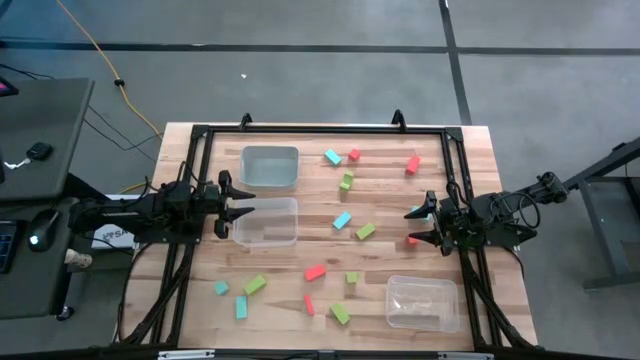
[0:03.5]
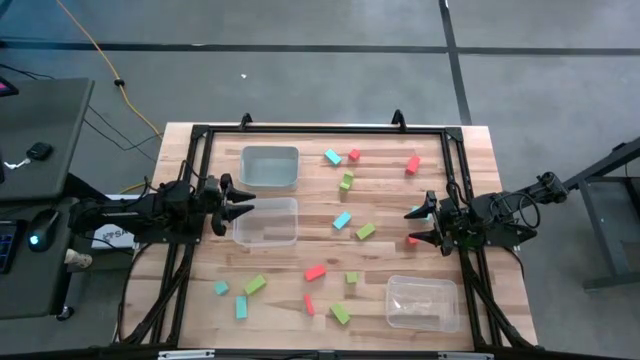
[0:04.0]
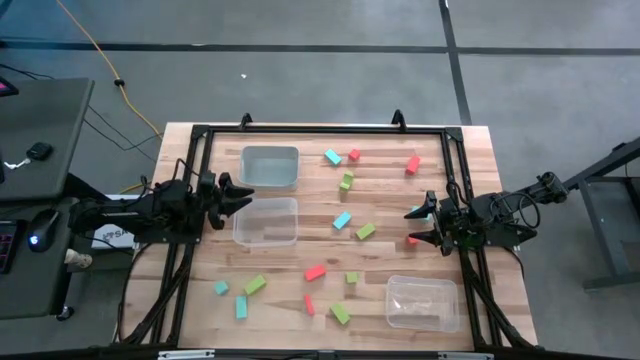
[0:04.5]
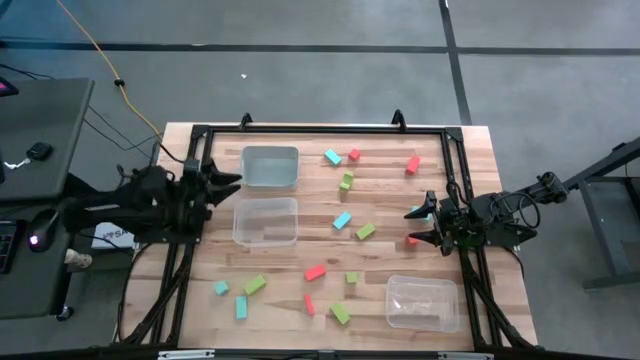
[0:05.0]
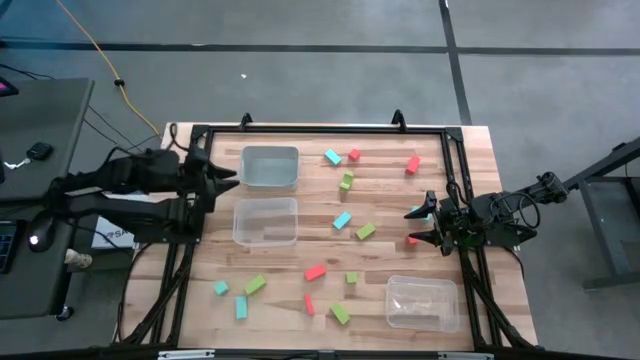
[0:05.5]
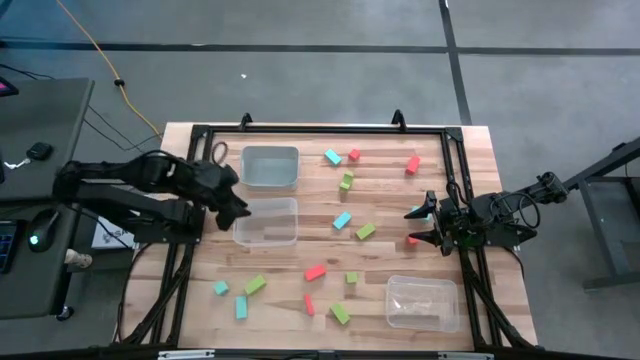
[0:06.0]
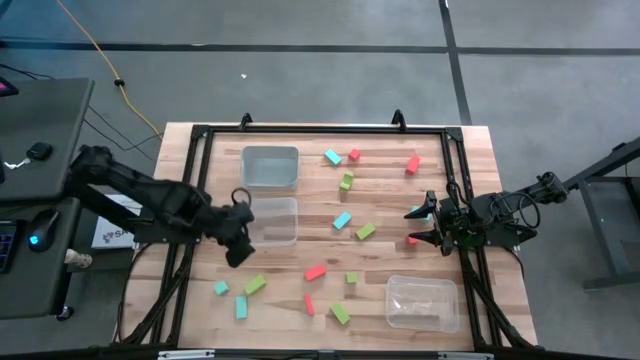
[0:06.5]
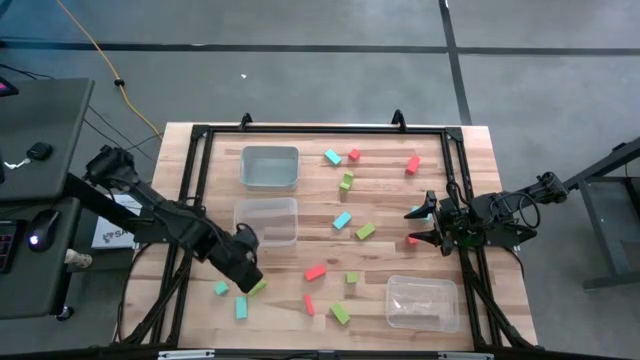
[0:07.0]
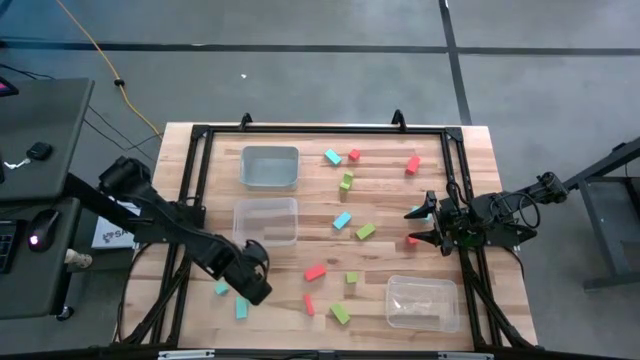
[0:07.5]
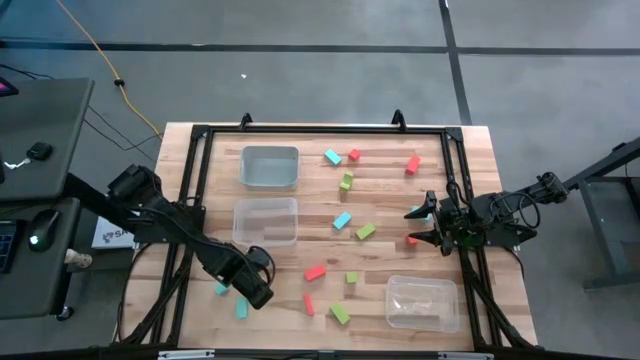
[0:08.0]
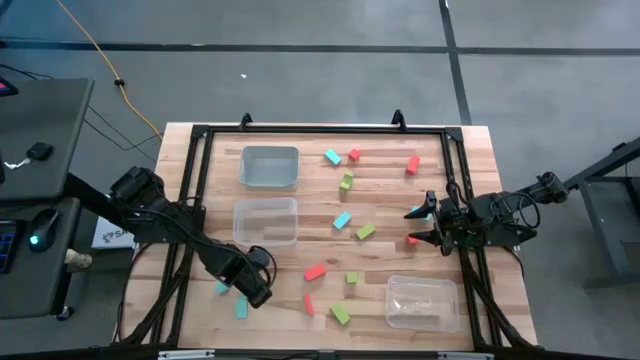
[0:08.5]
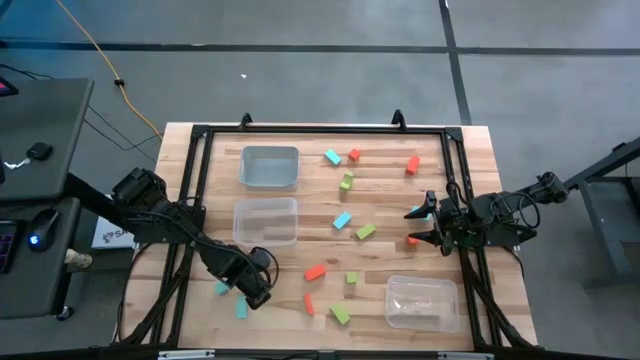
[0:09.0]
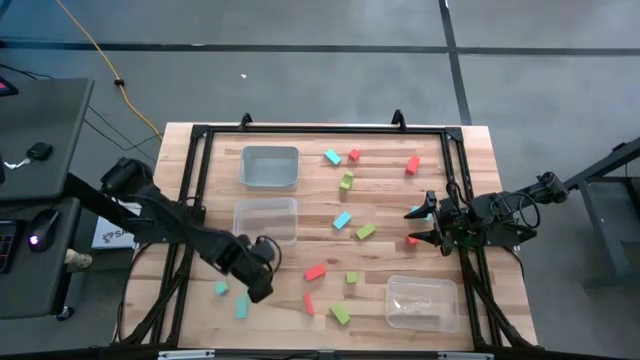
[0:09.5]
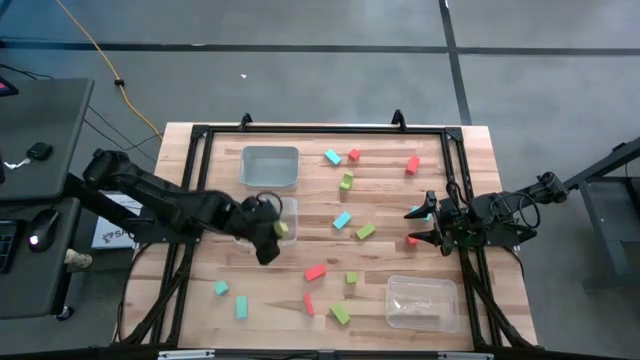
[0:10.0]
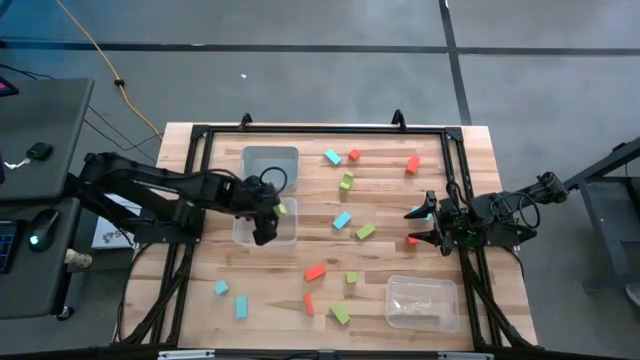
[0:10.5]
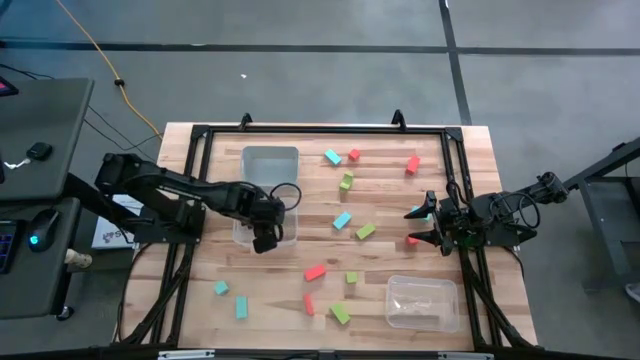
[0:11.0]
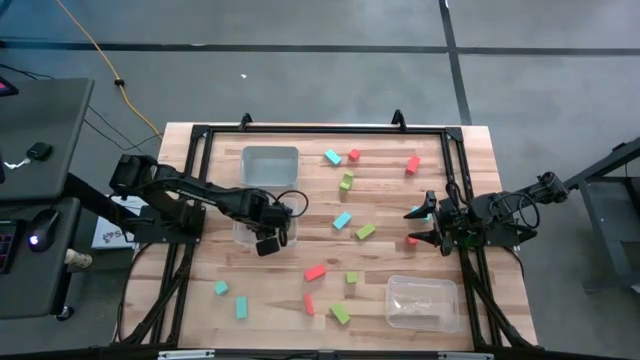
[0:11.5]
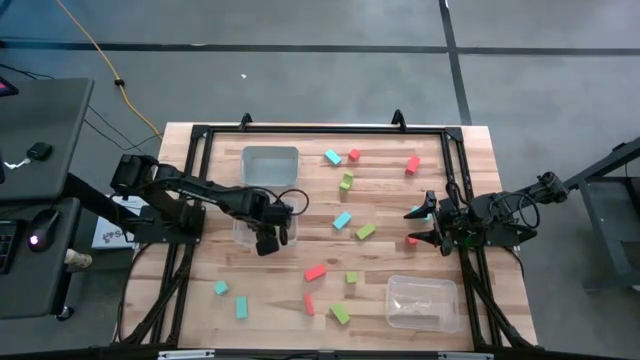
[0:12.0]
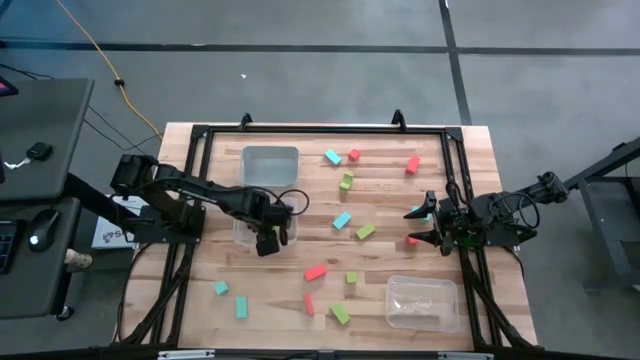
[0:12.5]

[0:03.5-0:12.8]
Task: Sort & place blocks by color
Put the green block into the left transparent bin

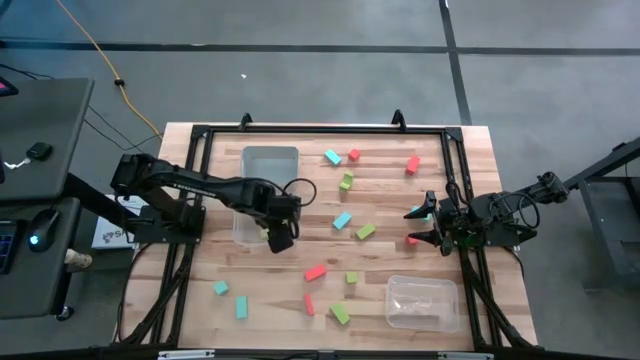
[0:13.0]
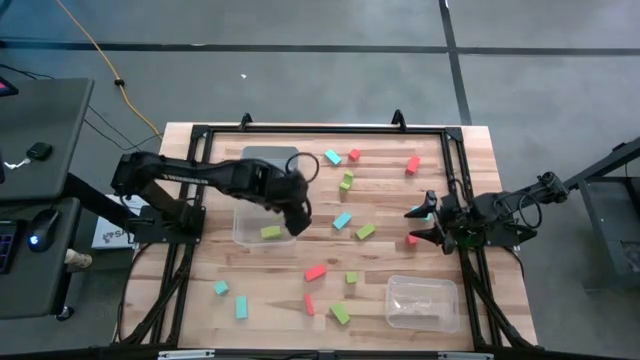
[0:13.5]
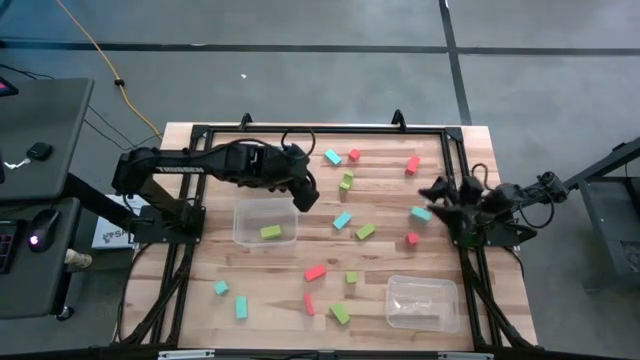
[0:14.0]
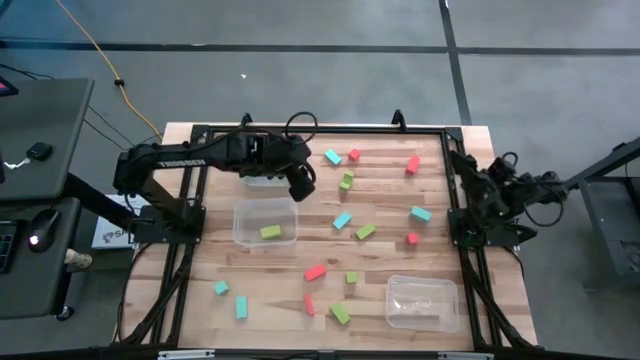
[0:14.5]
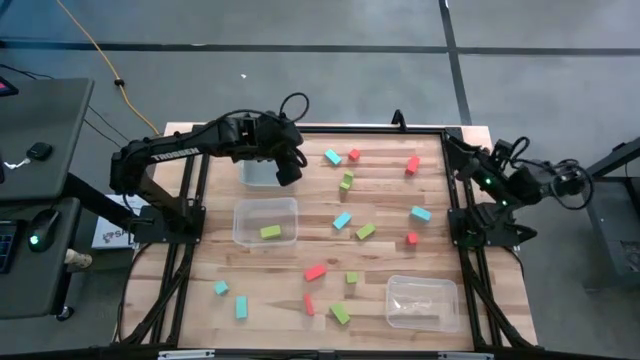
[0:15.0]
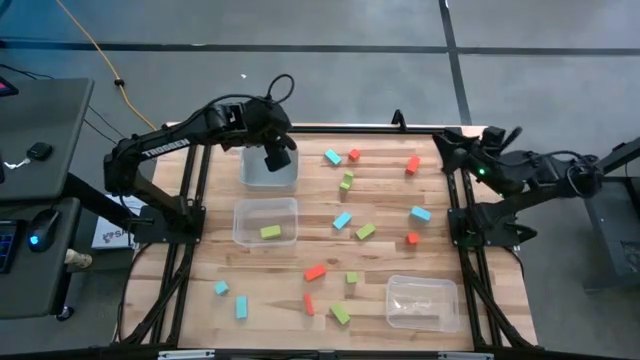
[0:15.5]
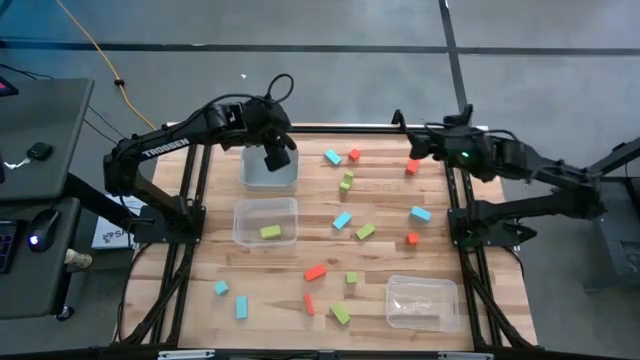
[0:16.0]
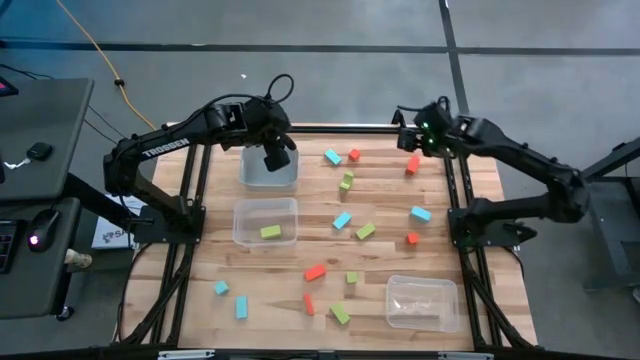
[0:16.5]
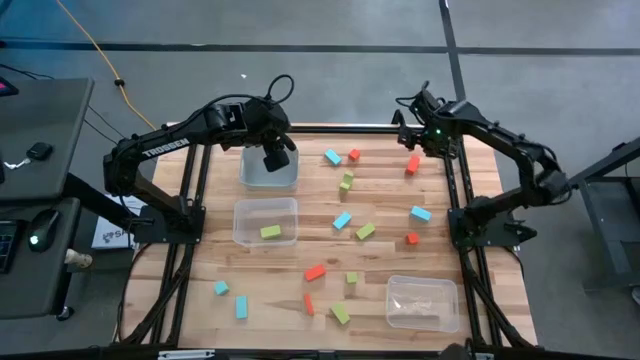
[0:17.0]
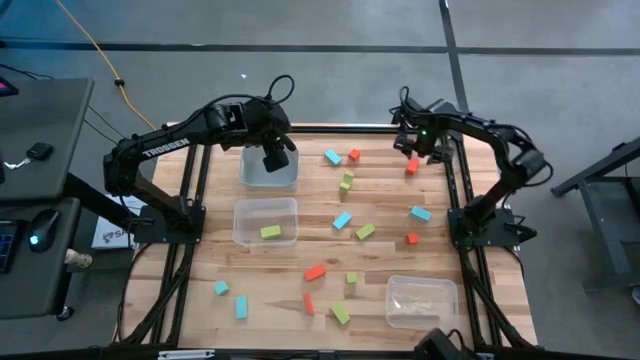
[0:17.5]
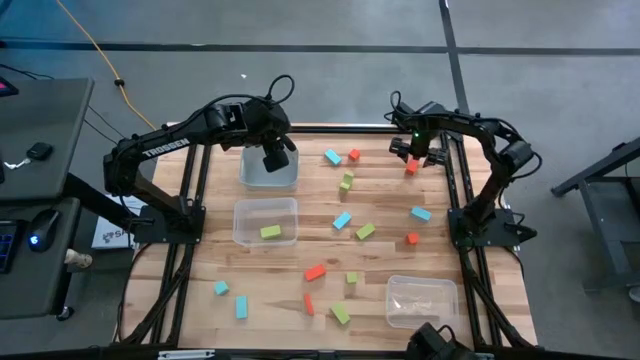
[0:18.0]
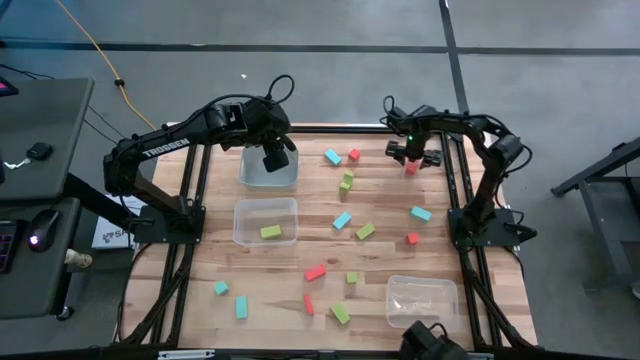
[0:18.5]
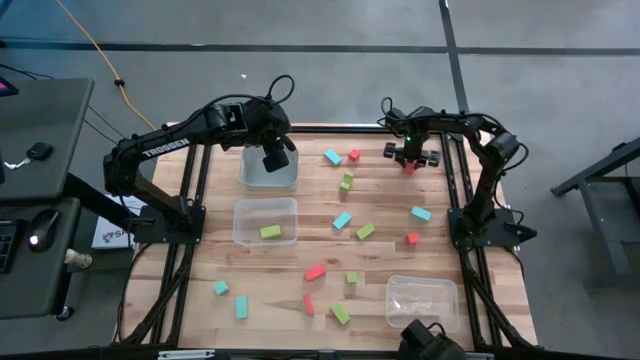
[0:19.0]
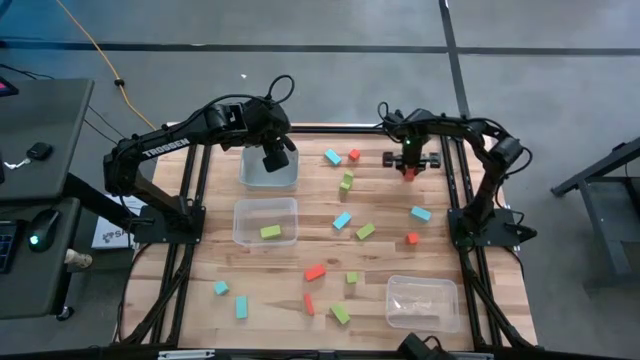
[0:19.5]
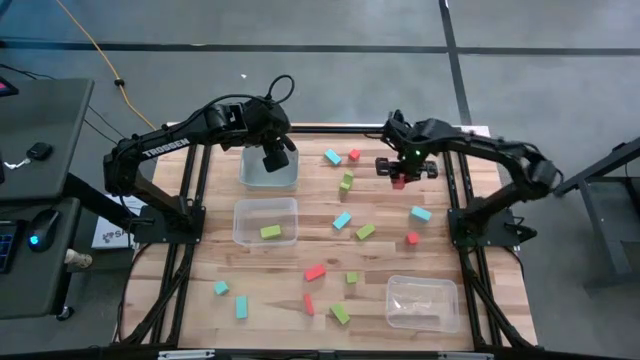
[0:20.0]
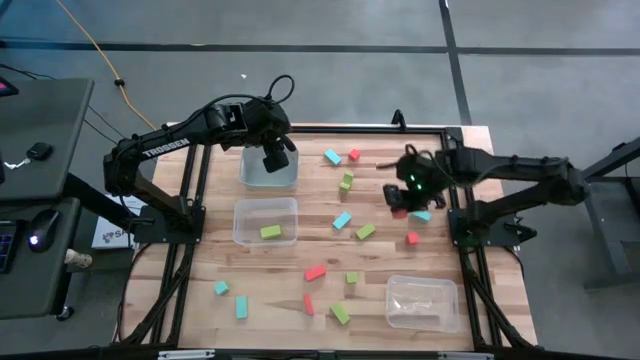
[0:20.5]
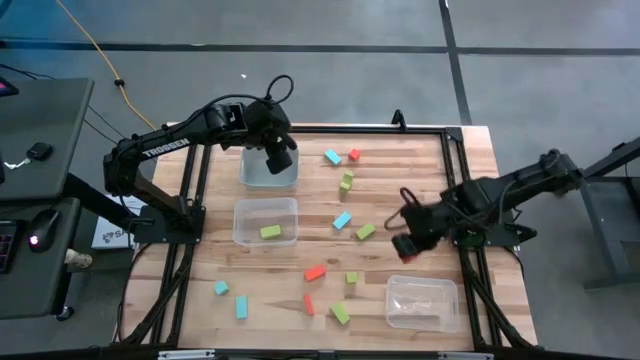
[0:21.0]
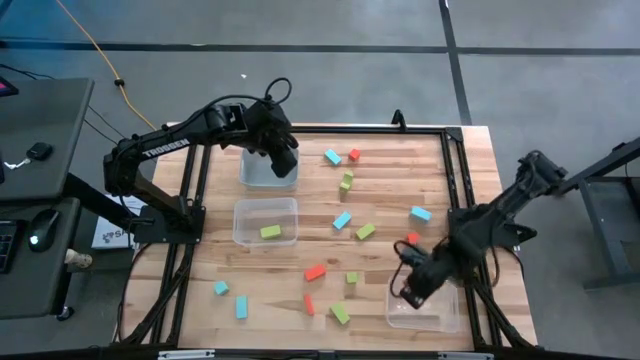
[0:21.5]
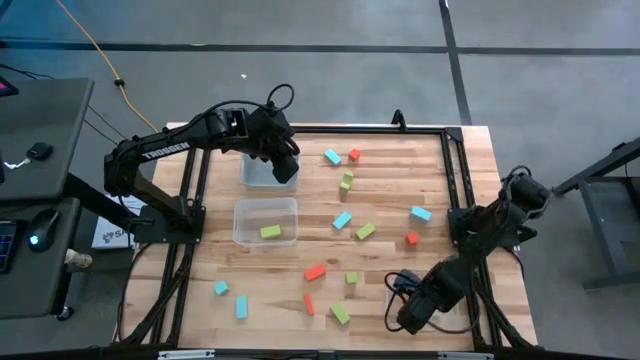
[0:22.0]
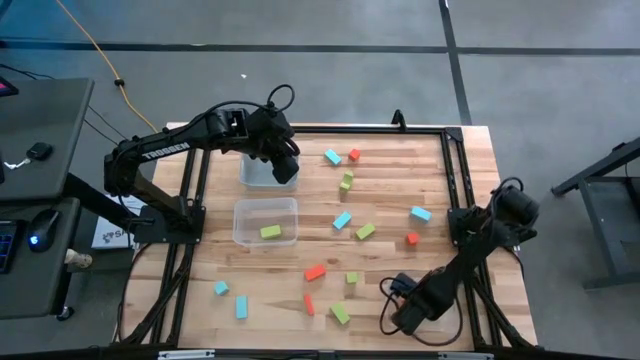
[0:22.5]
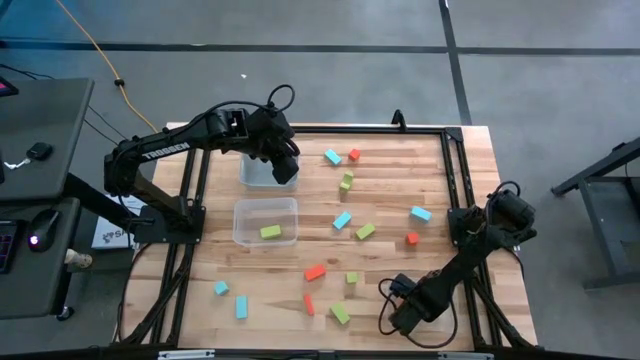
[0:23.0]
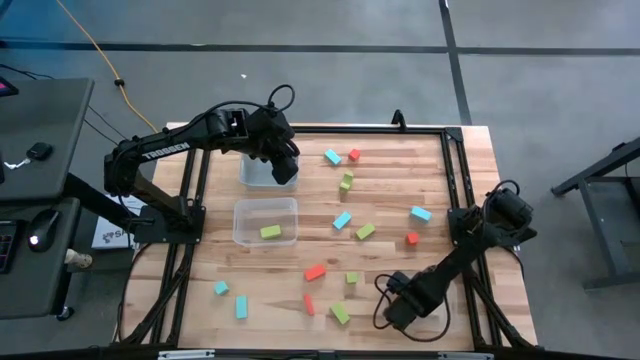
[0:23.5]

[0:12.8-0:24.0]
Put the orange block into the right transparent bin
